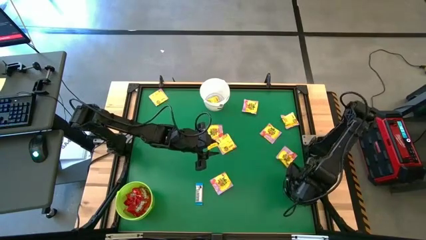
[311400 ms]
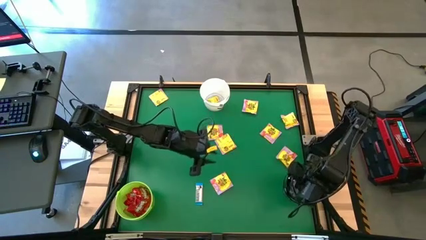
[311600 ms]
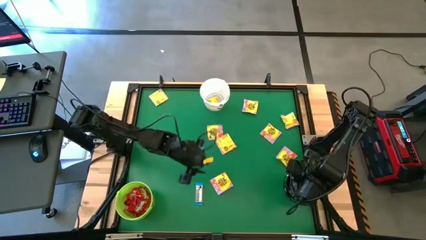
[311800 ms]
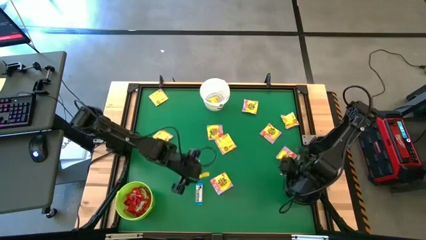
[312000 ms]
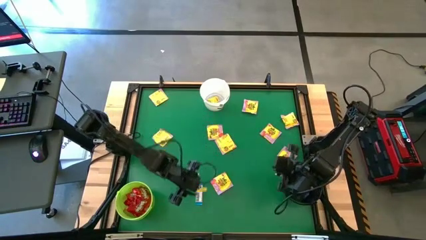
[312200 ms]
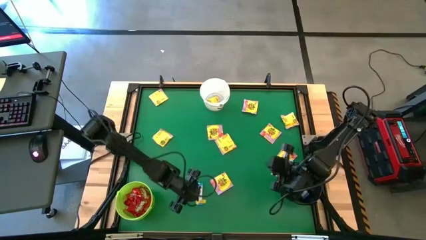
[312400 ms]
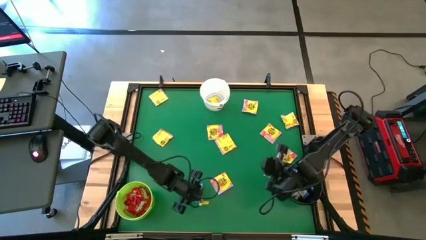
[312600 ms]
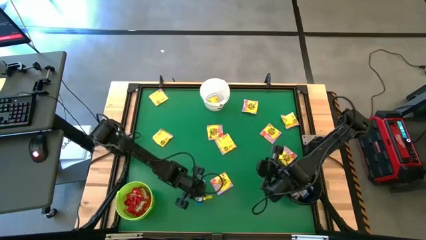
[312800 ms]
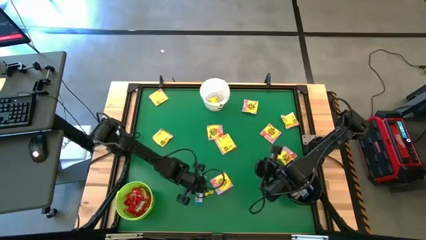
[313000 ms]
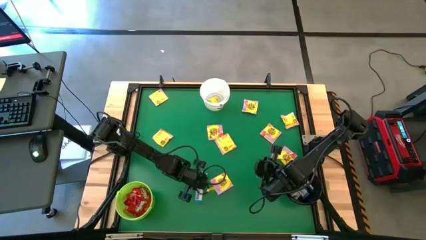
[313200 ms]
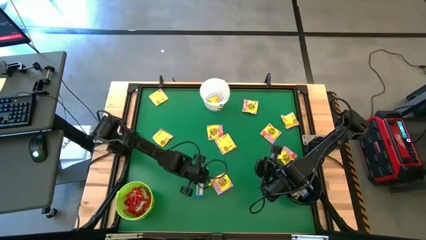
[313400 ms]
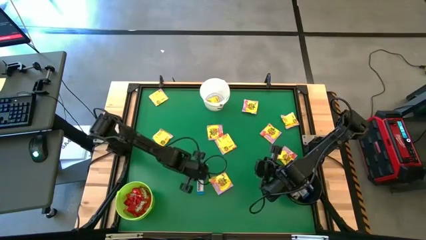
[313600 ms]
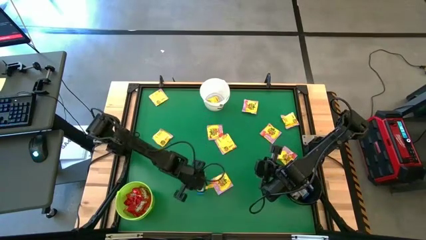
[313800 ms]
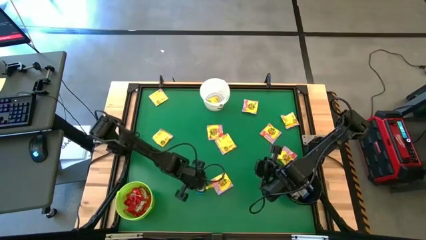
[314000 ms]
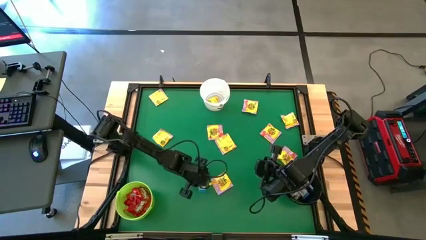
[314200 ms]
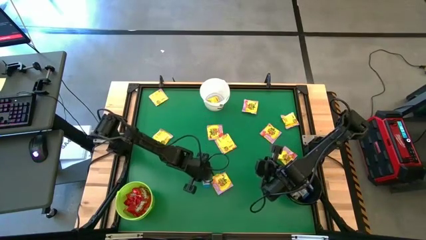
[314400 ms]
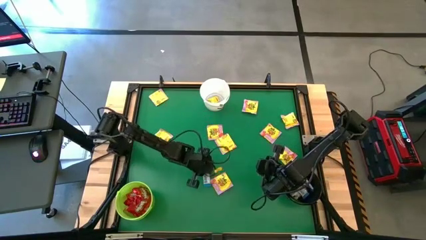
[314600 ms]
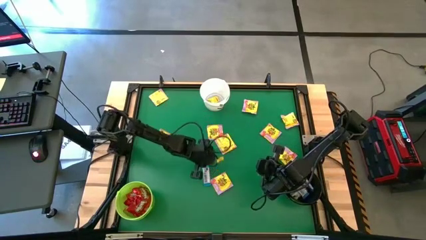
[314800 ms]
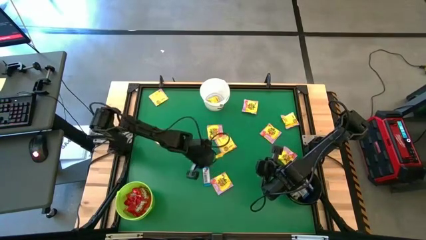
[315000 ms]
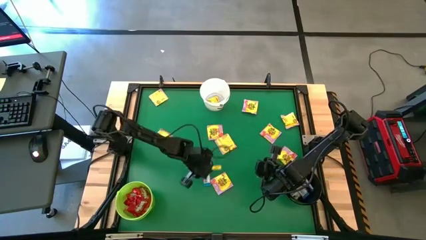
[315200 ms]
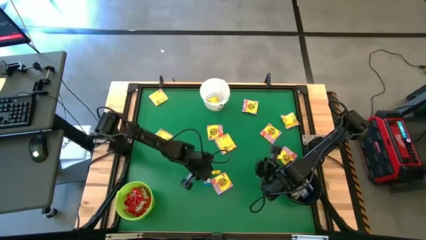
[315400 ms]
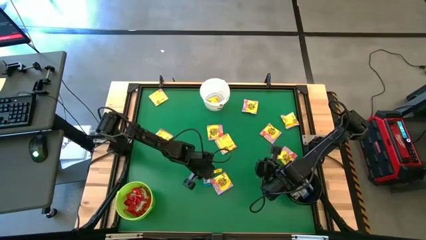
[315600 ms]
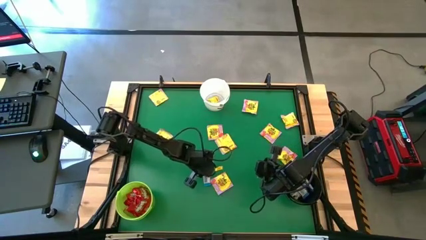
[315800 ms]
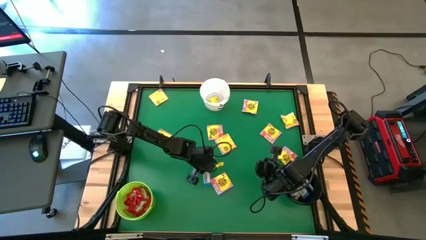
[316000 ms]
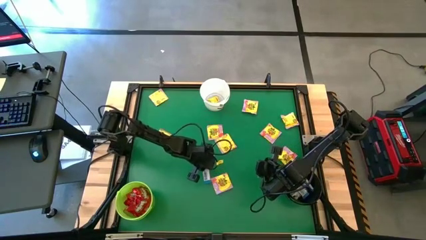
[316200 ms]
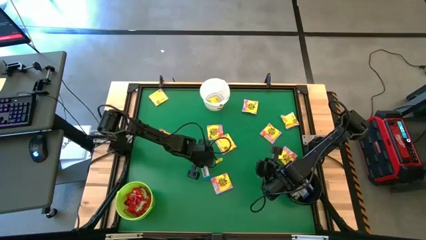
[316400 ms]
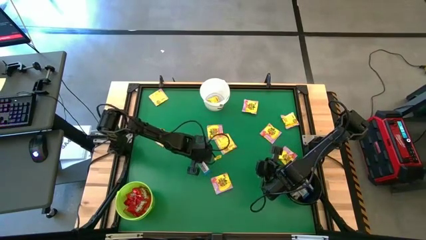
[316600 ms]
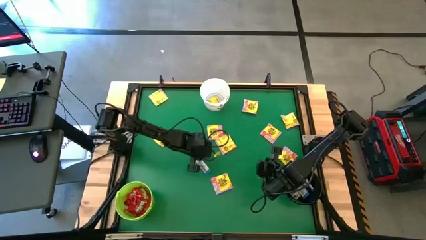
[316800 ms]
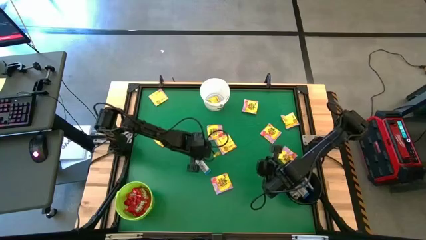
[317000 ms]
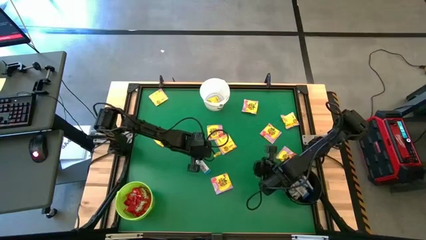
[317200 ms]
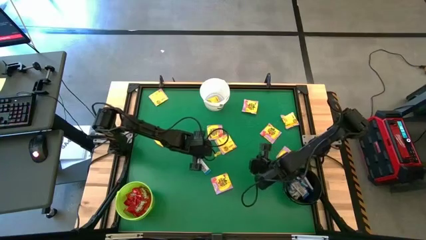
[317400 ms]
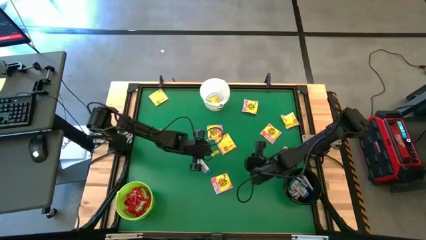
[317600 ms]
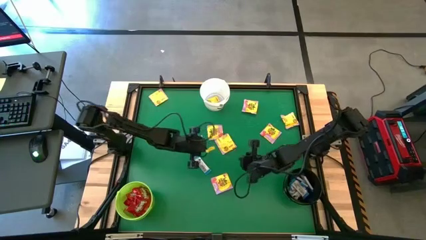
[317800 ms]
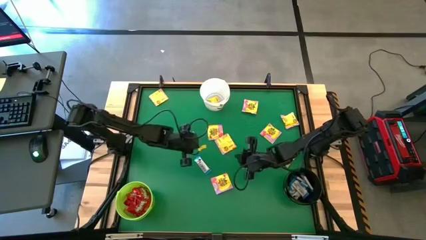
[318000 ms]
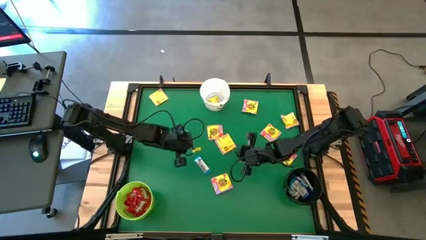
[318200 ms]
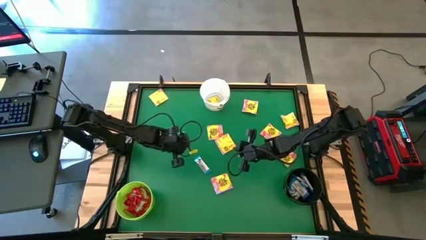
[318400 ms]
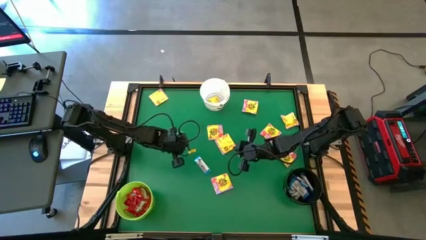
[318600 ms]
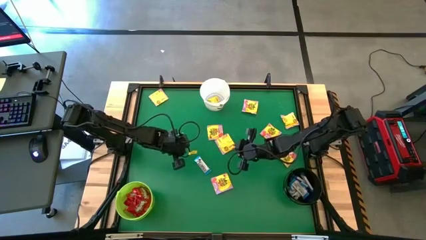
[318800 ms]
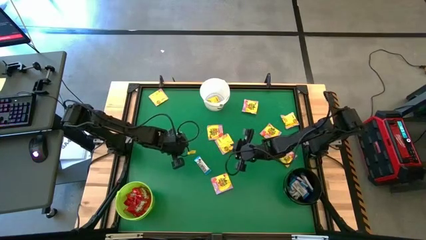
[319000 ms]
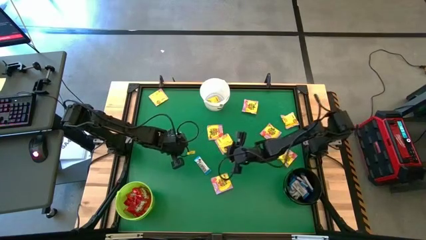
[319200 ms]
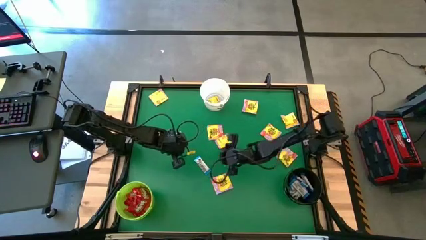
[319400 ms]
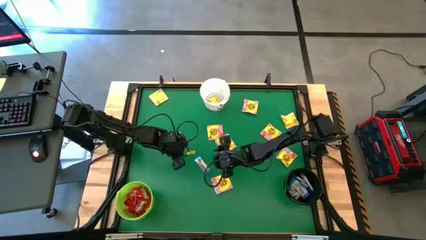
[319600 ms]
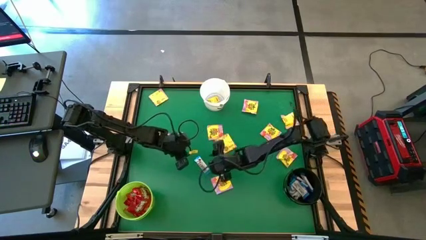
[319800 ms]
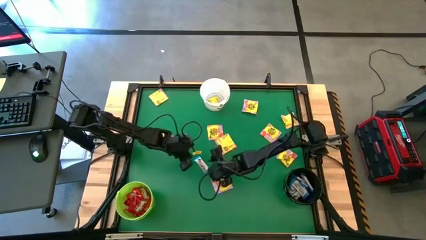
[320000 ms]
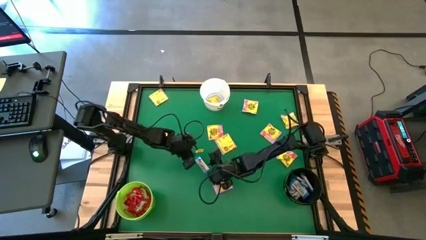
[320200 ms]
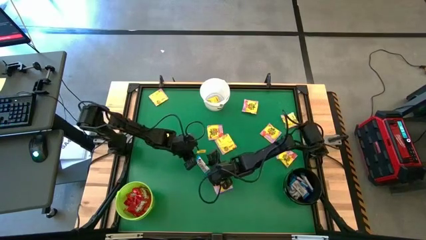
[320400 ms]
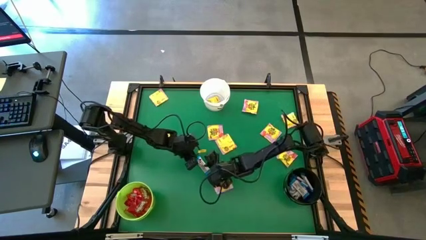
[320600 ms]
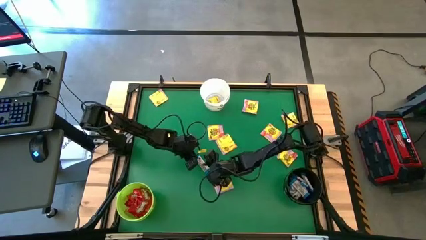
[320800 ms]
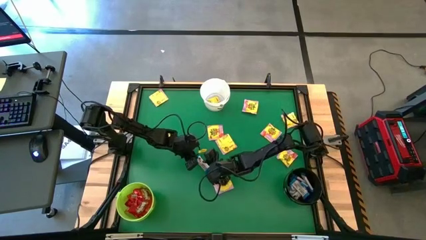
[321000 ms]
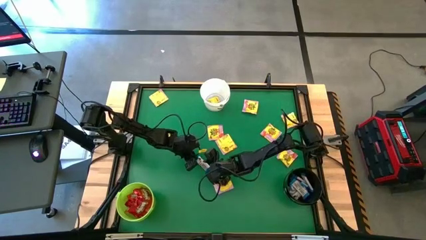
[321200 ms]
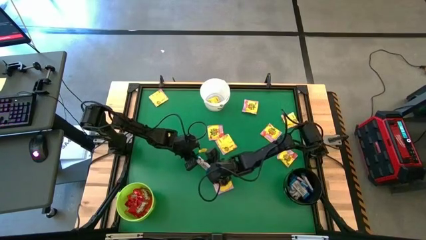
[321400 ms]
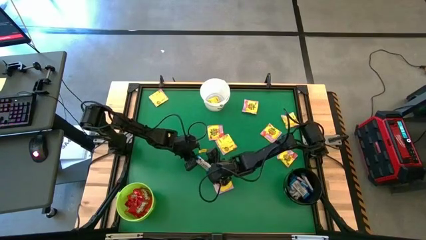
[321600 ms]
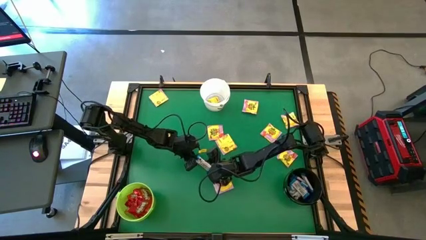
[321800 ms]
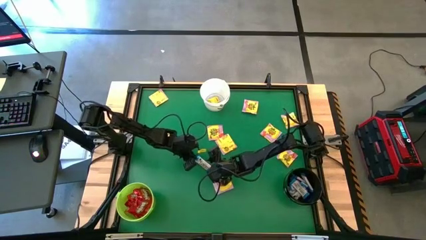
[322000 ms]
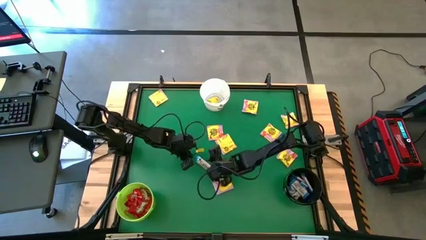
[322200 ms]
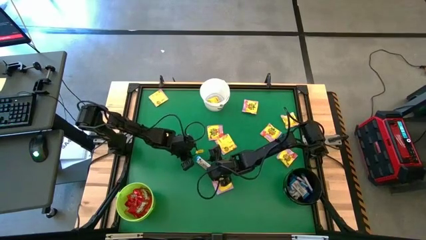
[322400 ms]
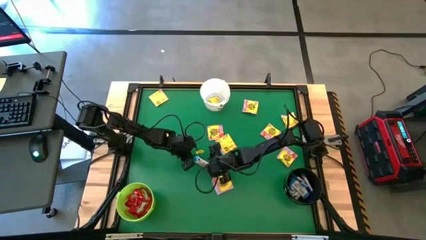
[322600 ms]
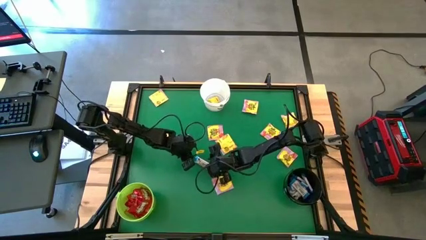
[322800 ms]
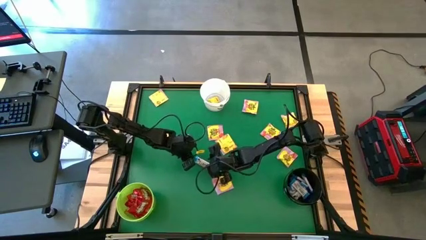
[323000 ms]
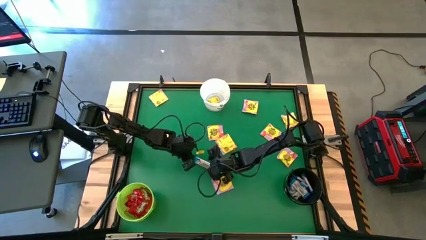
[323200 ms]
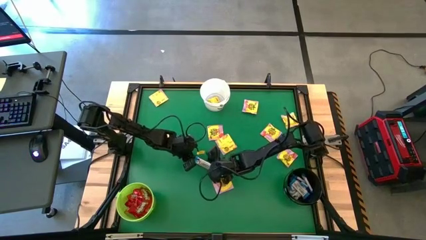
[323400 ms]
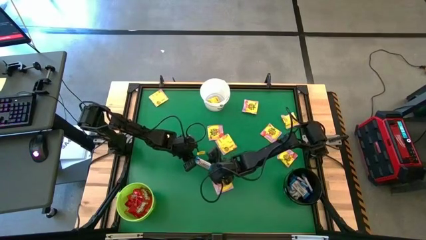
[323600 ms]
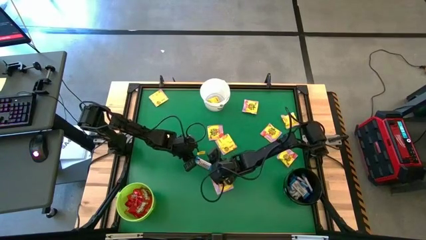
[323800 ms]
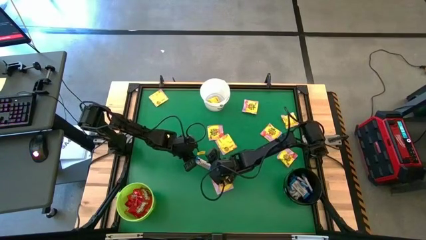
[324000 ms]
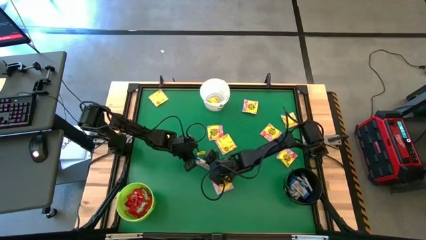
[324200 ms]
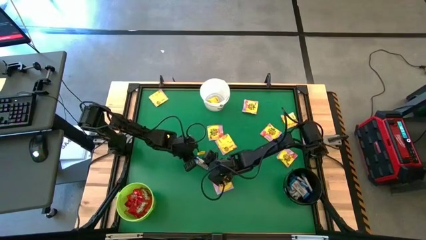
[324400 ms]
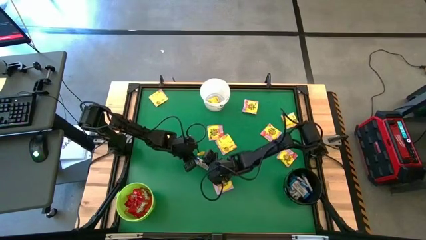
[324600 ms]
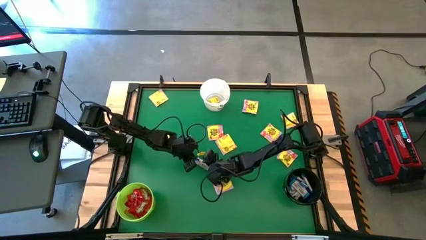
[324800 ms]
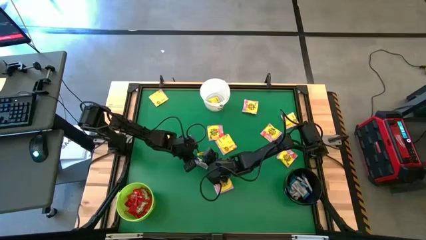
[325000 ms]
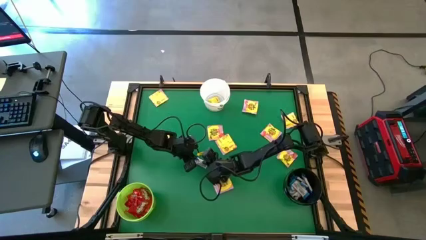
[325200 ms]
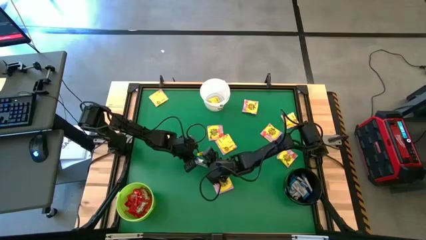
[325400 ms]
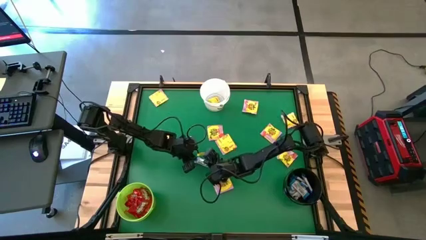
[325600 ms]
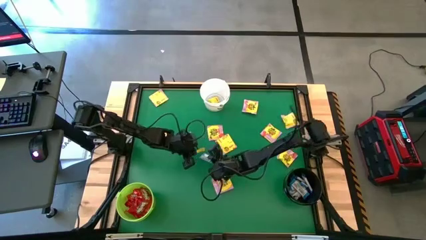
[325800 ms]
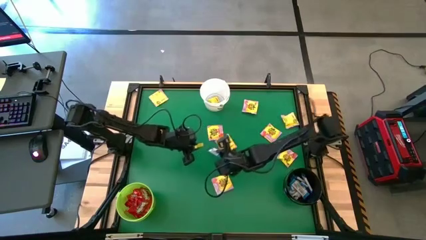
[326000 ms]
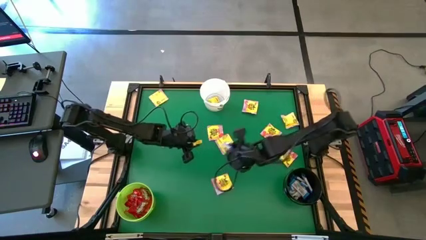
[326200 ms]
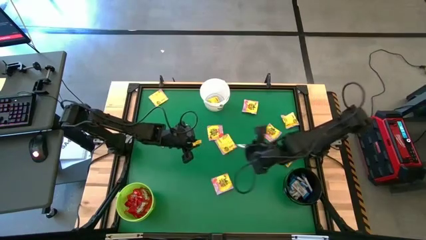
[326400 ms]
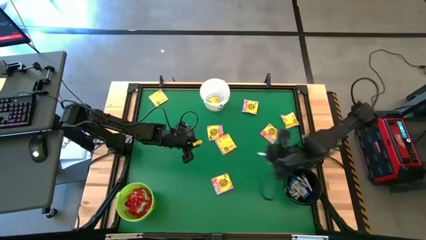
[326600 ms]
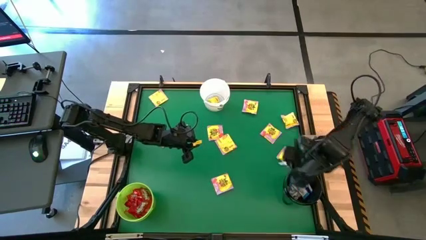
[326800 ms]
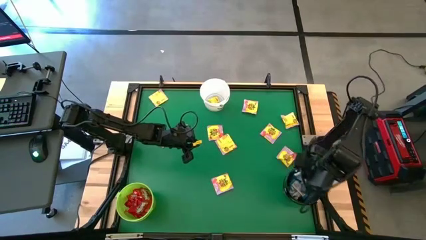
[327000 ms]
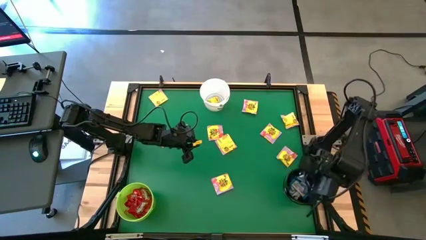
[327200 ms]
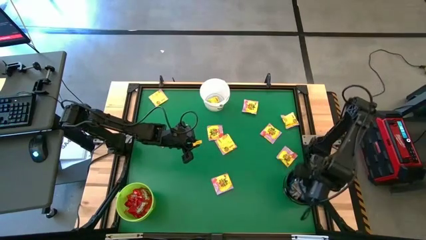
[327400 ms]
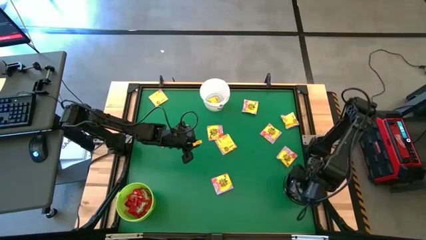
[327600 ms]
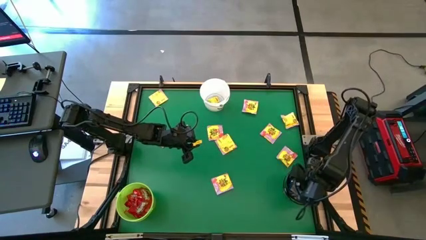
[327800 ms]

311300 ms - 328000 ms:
Task: Sort candy by brand, put in halloween buckets
Put the white candy into the black bucket
